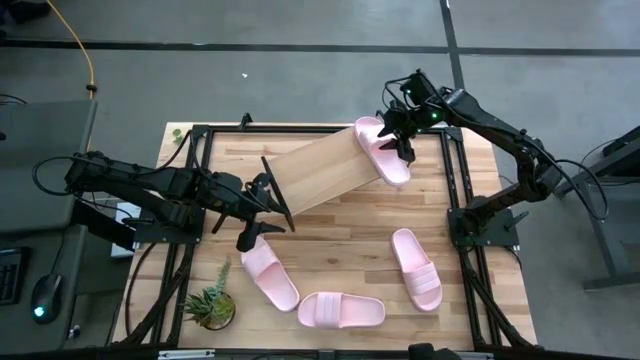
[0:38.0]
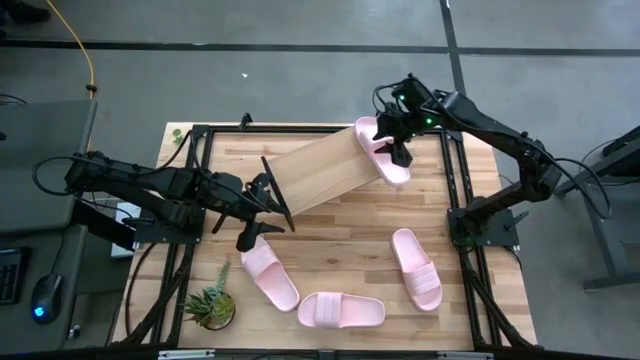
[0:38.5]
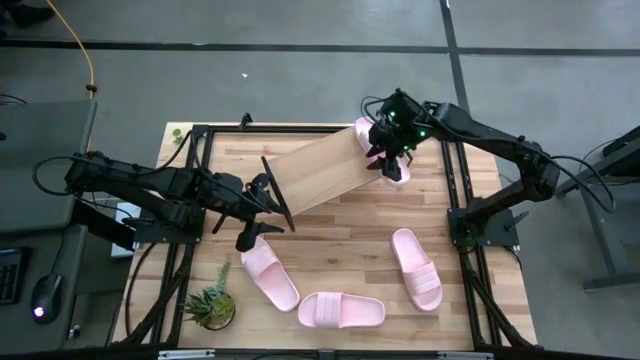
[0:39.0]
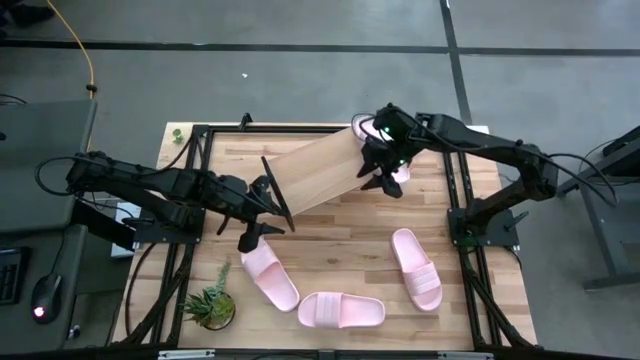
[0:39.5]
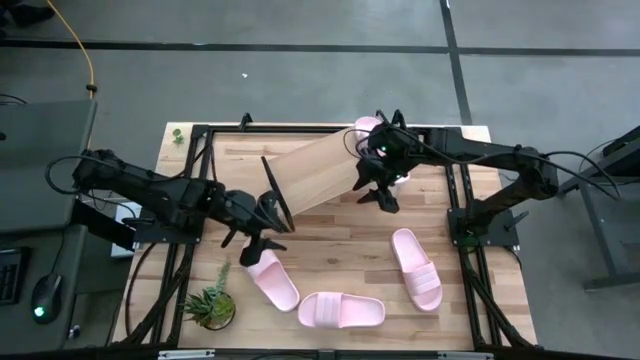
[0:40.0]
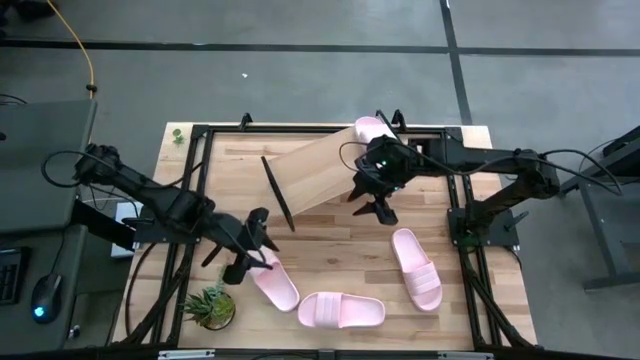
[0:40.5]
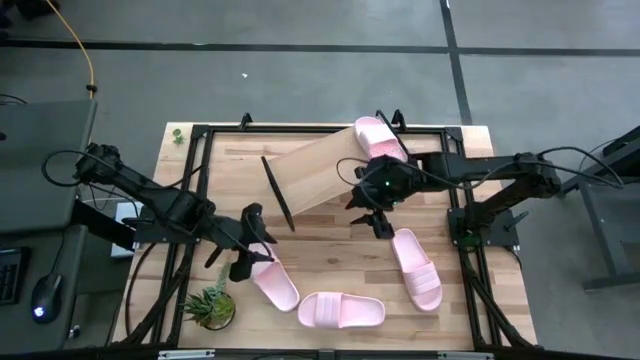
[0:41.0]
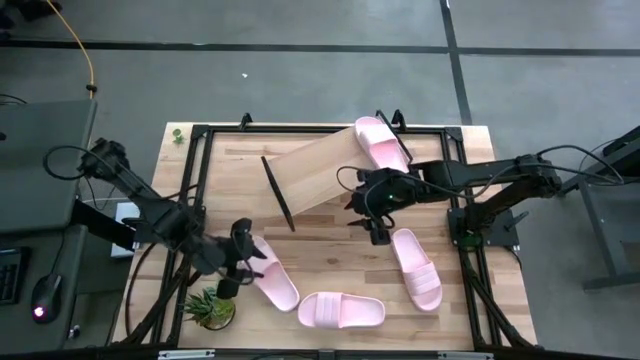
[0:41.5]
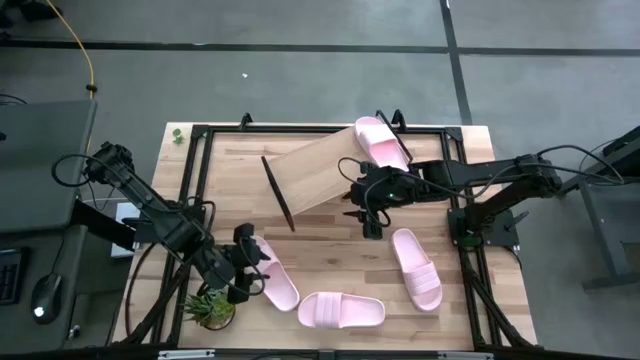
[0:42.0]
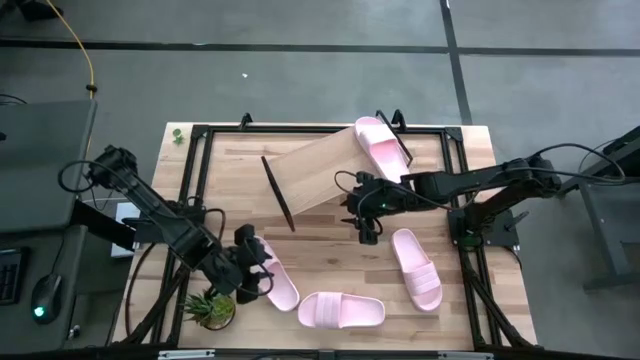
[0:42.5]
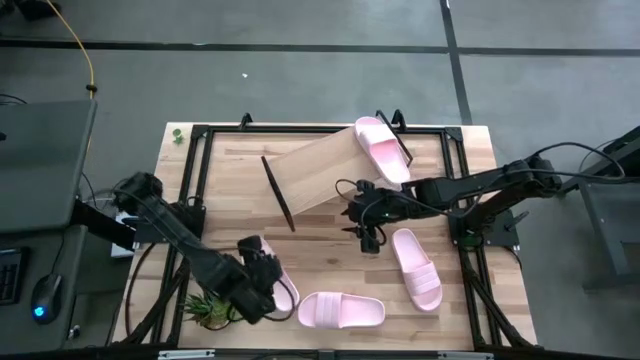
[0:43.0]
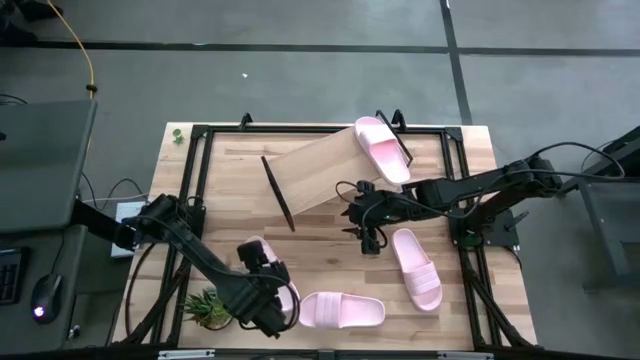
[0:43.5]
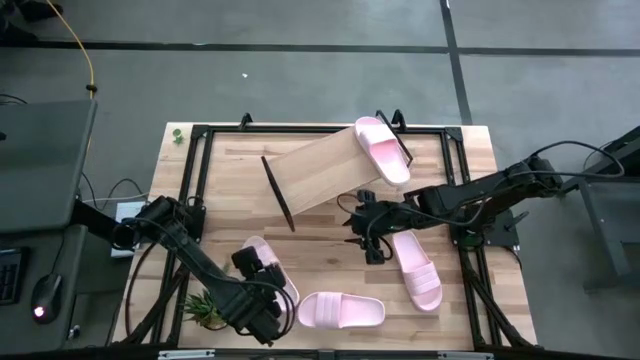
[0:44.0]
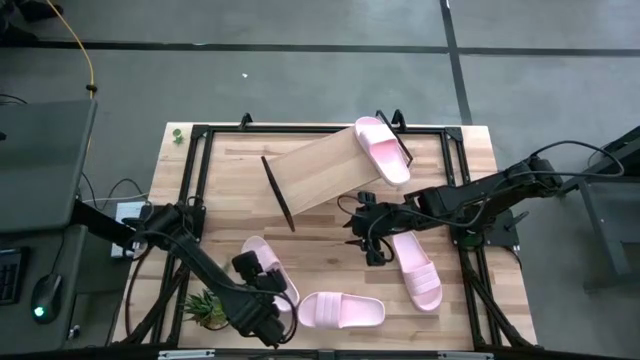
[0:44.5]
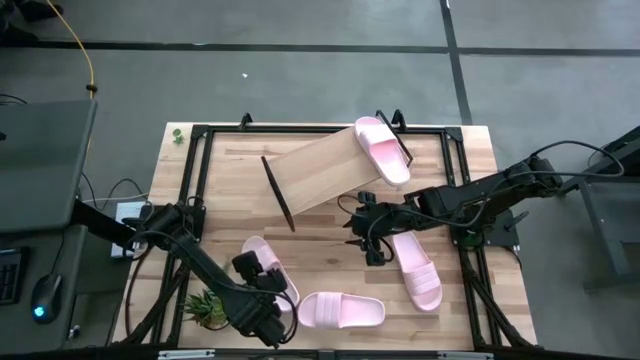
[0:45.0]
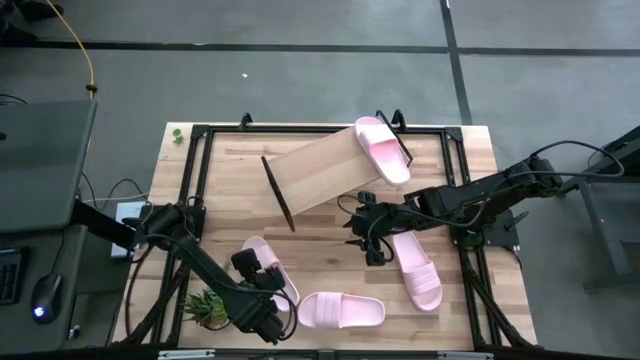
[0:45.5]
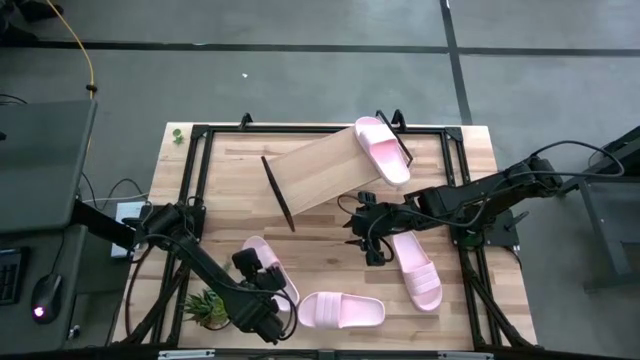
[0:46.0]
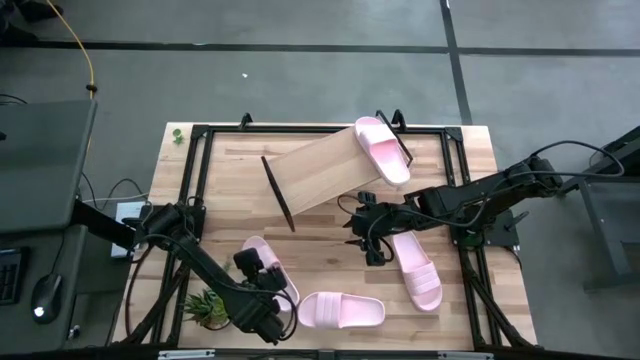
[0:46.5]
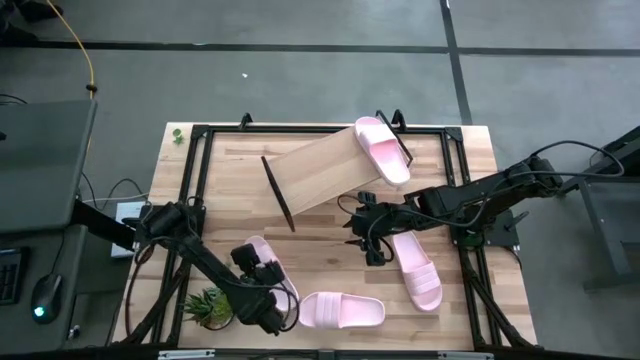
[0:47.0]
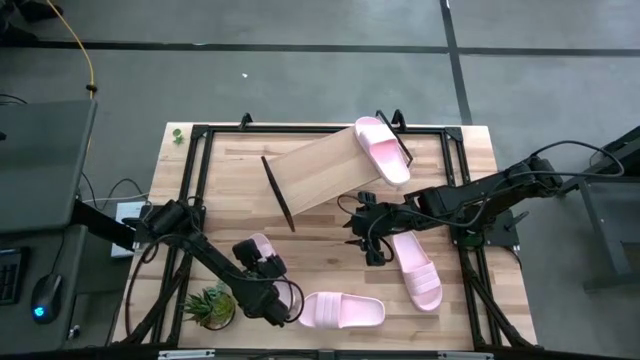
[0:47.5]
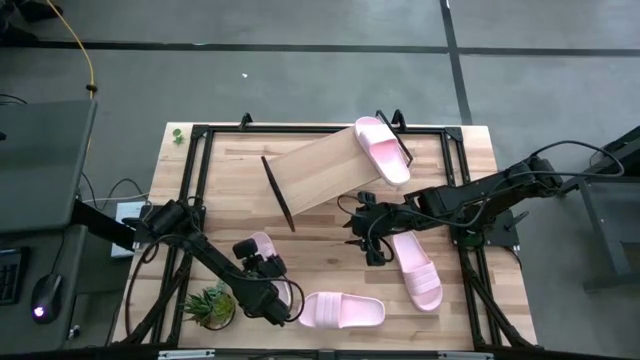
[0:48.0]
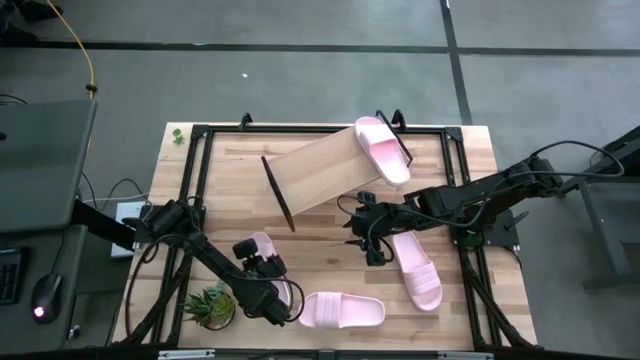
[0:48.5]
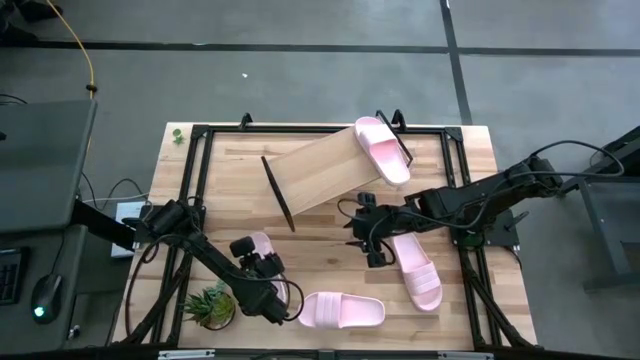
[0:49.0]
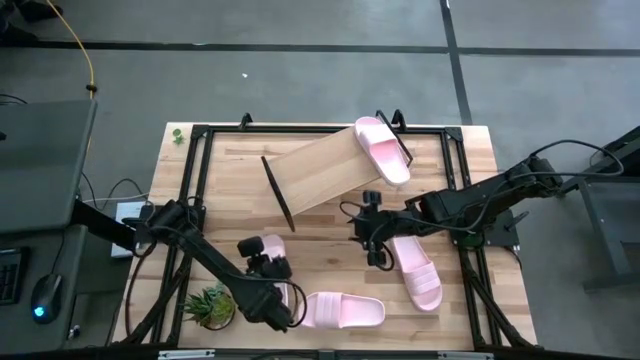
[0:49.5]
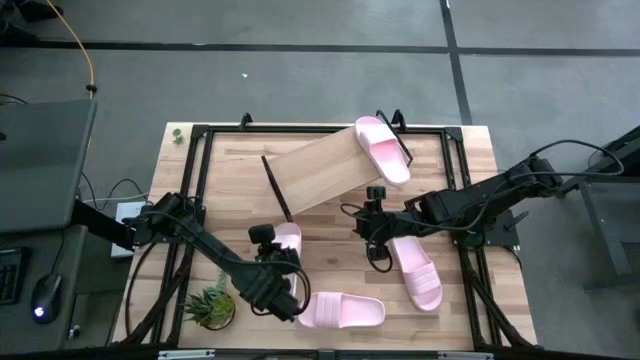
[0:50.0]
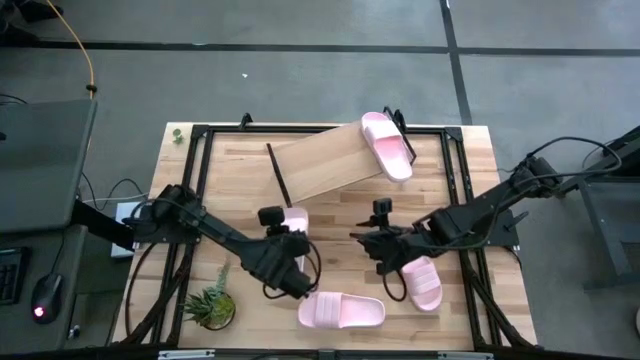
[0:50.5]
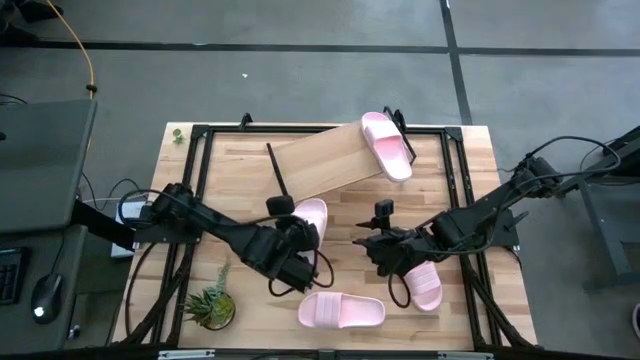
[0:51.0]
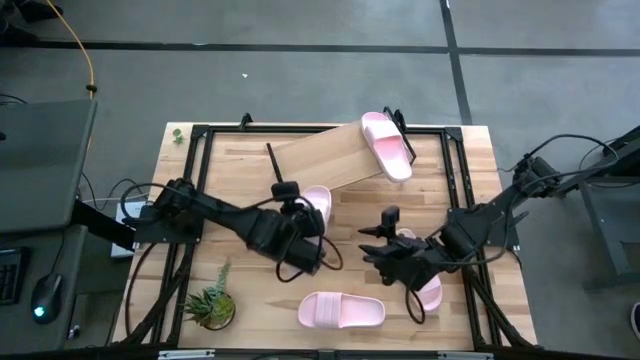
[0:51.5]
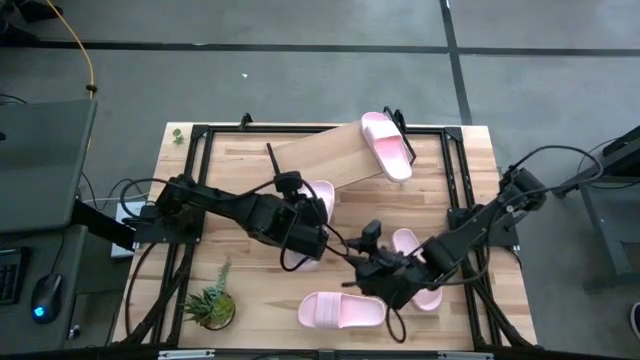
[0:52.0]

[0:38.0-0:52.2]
Task: Pick and place slides into the shelf
Put the pink slide on the shelf

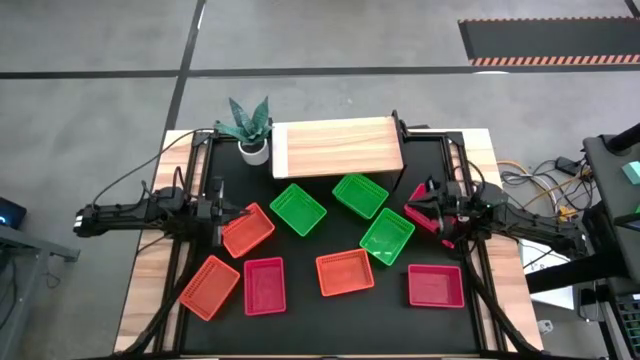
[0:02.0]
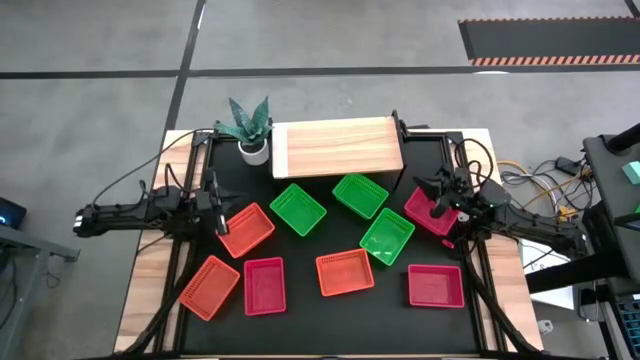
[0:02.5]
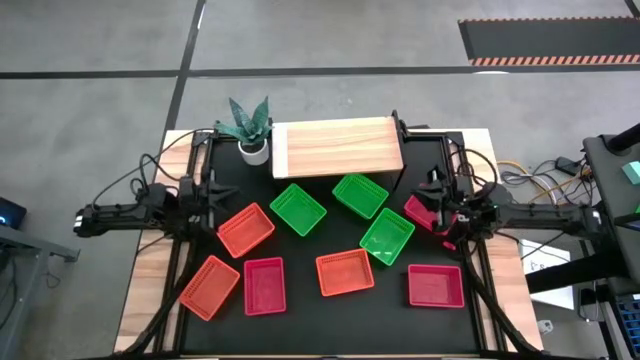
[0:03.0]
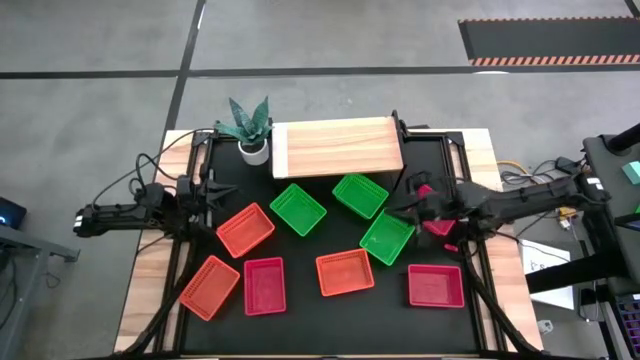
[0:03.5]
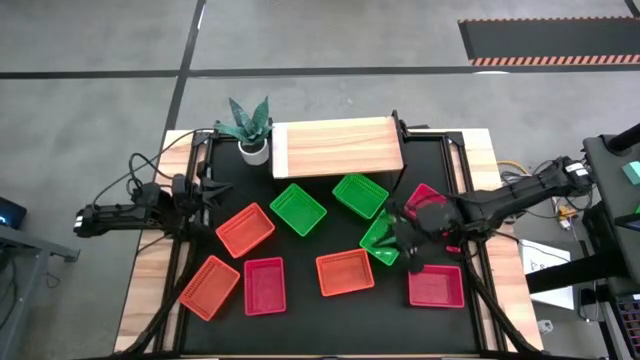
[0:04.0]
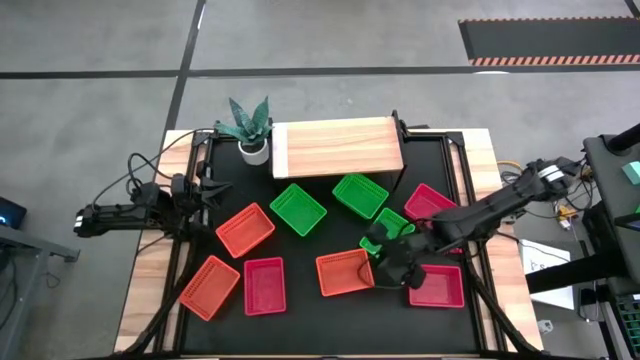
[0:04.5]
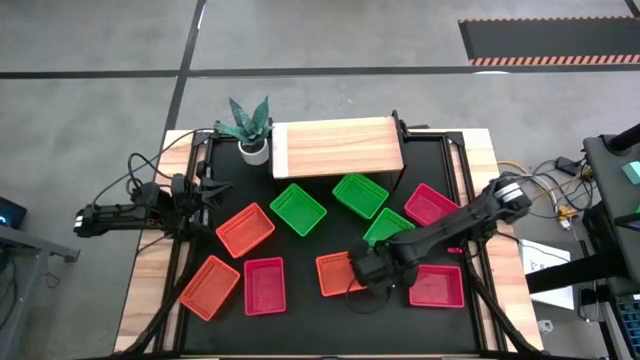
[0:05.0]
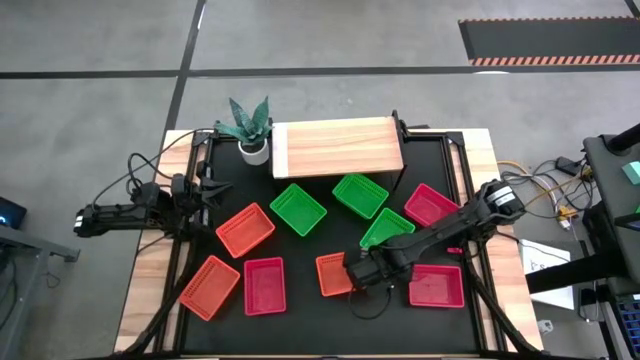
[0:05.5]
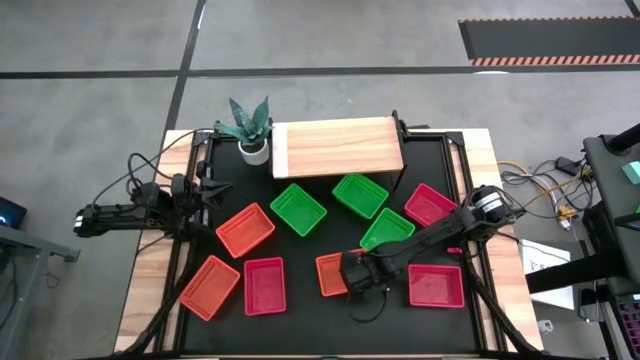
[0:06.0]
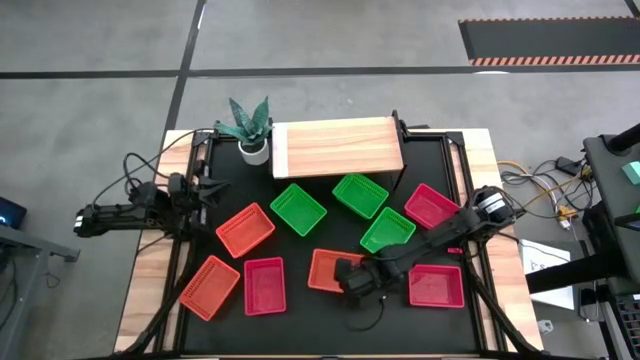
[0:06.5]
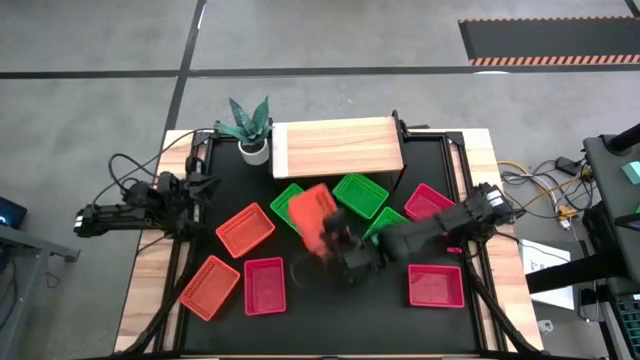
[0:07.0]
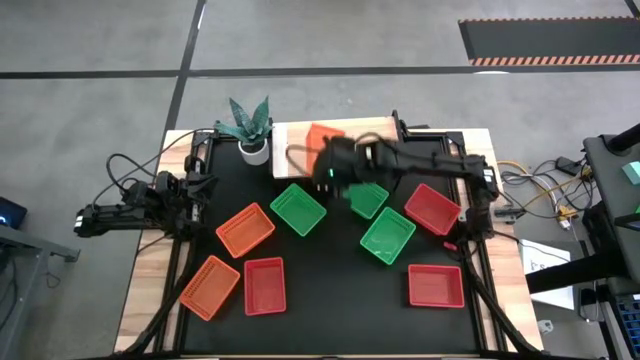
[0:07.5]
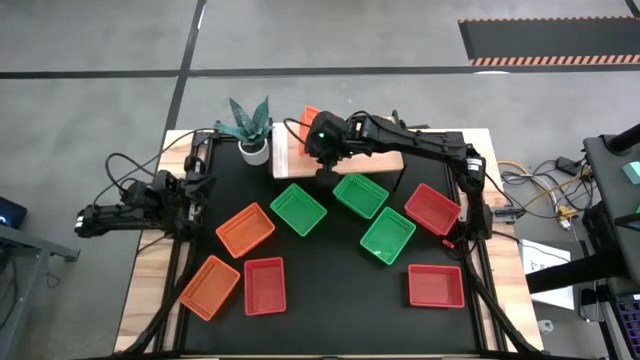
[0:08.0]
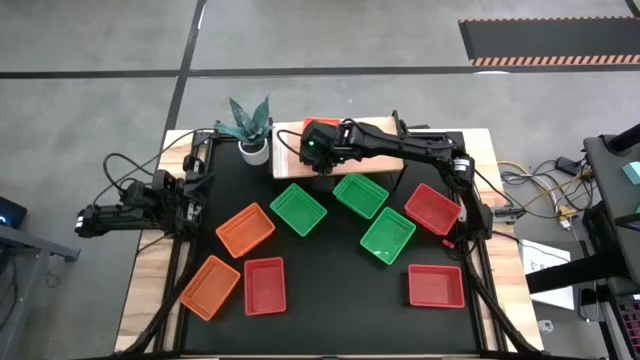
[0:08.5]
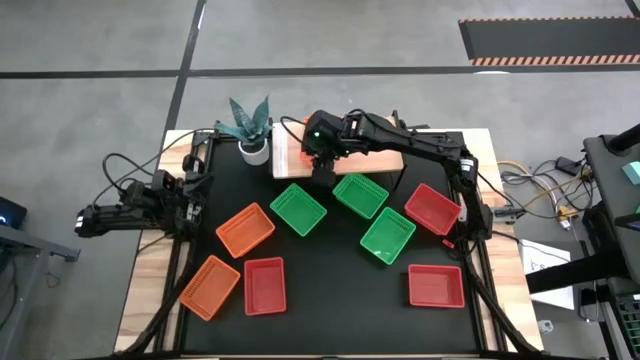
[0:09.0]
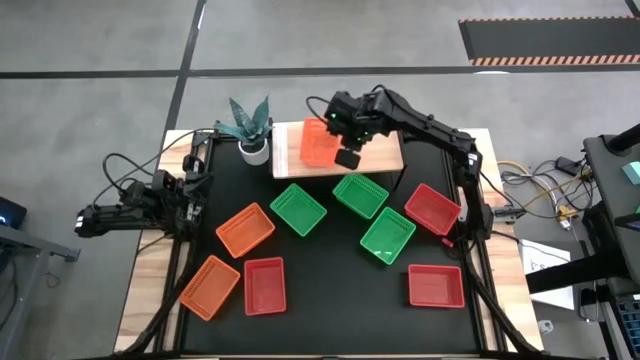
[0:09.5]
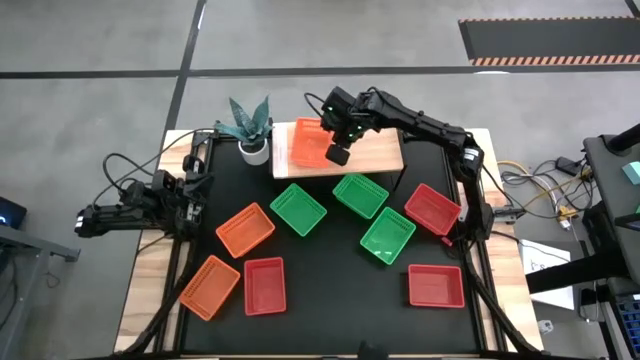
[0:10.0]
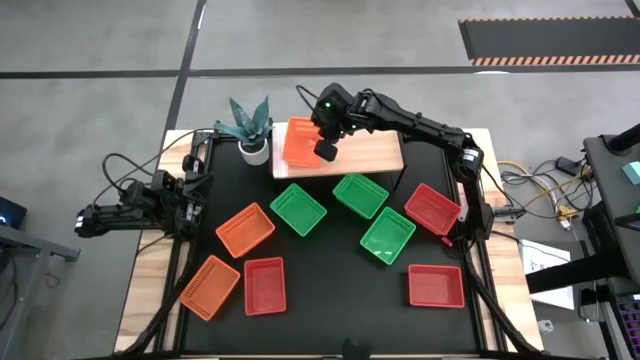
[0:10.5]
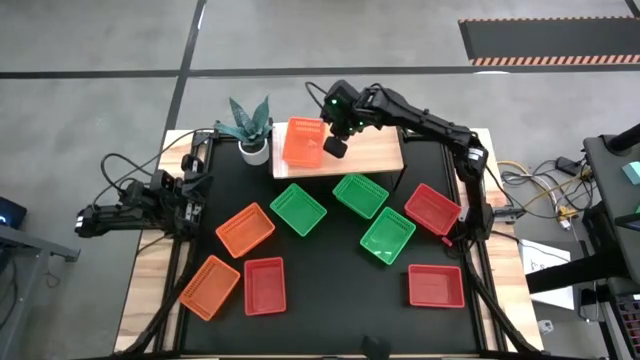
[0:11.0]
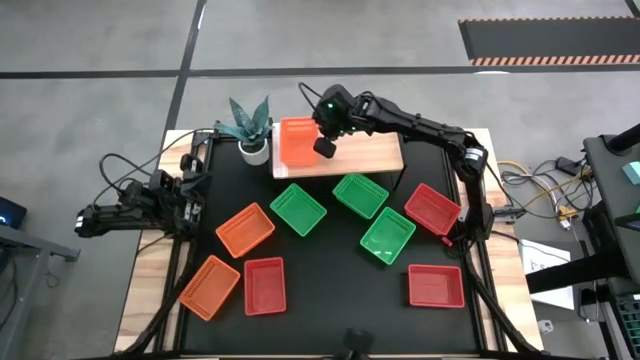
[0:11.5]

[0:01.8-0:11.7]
Task: Stack baskets on shelf by color
Put the bottom right orange bin on the shelf
